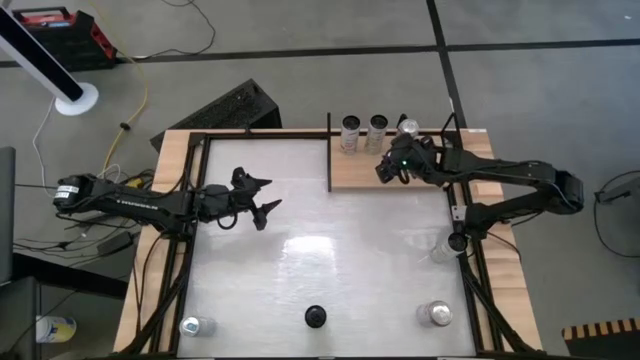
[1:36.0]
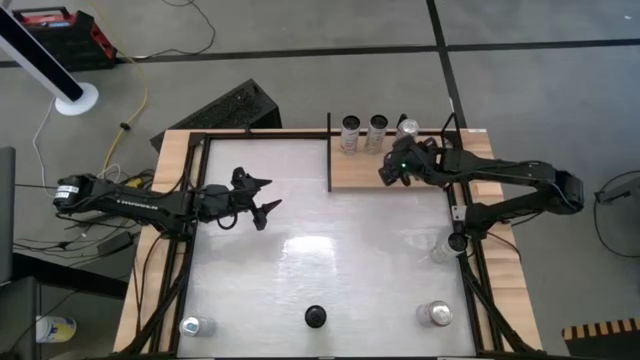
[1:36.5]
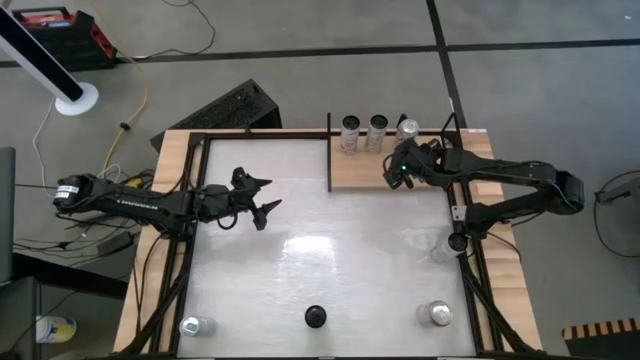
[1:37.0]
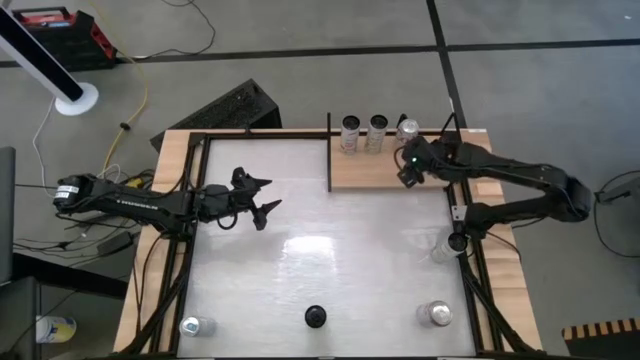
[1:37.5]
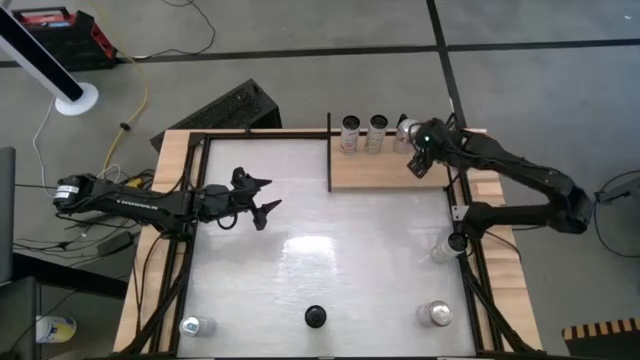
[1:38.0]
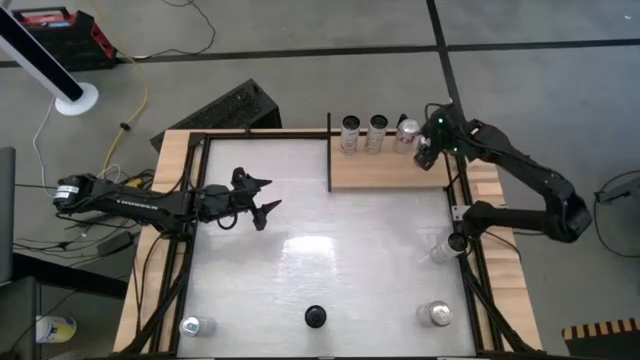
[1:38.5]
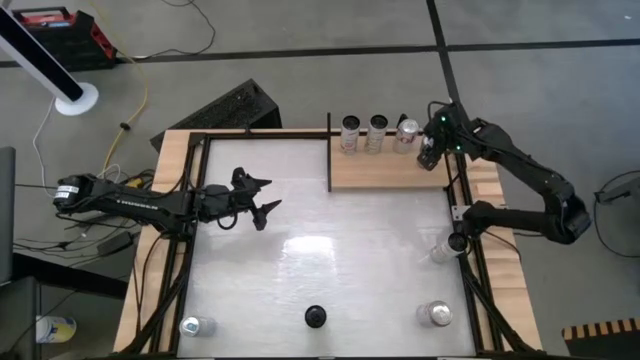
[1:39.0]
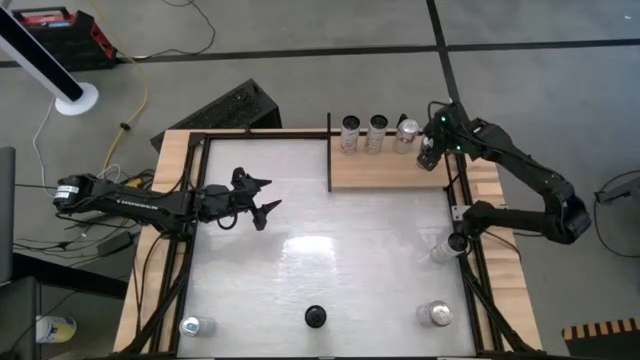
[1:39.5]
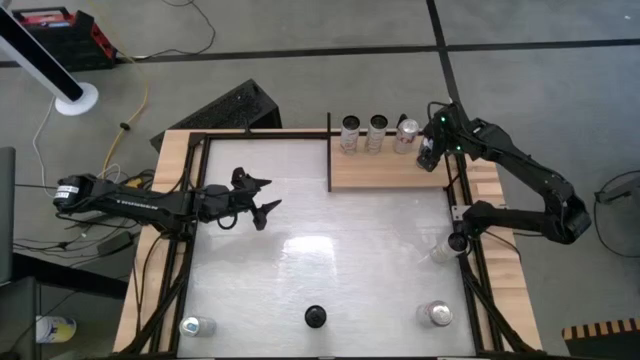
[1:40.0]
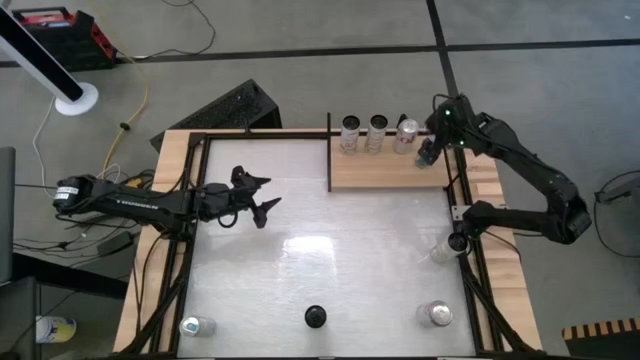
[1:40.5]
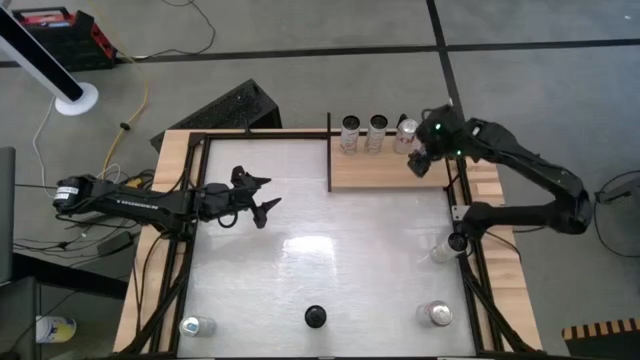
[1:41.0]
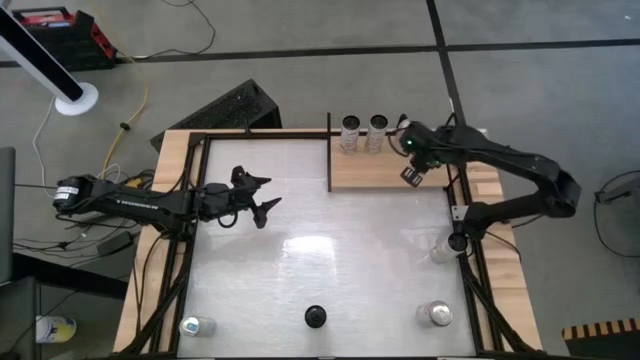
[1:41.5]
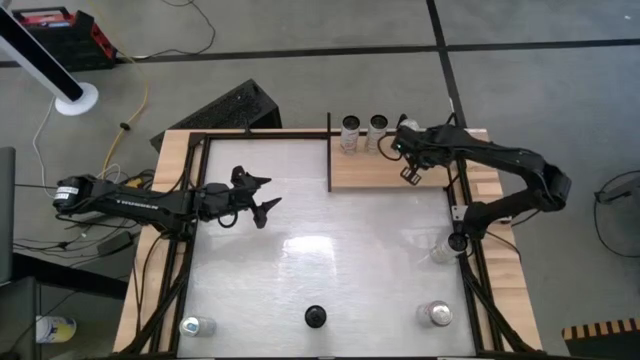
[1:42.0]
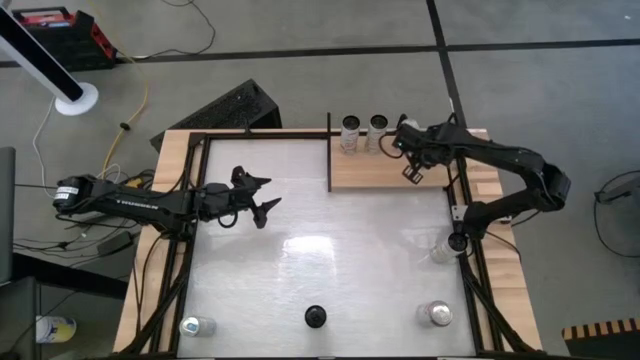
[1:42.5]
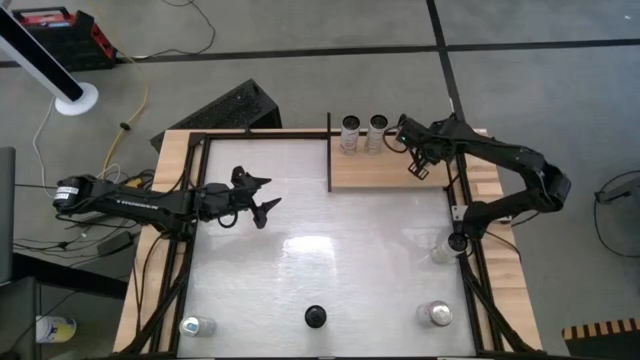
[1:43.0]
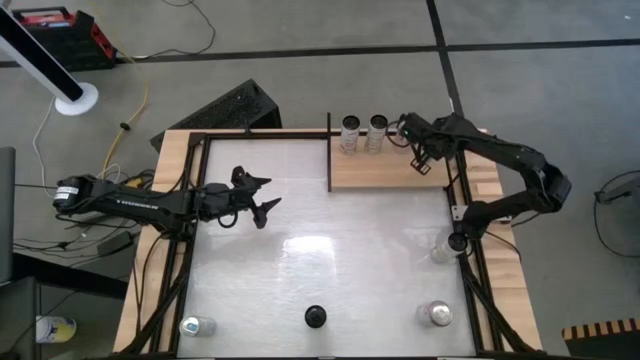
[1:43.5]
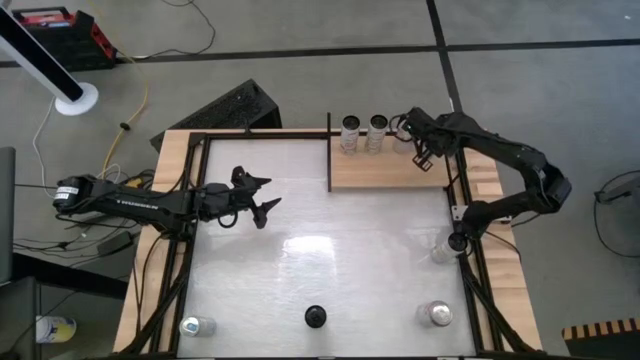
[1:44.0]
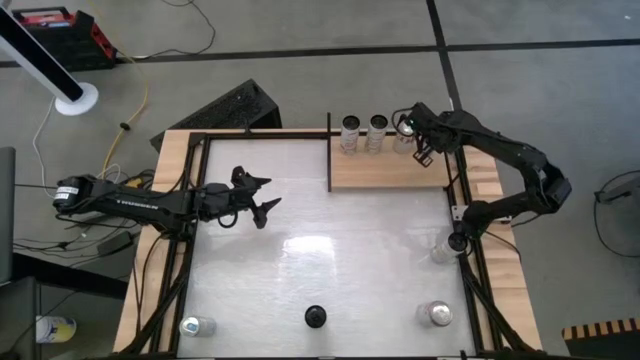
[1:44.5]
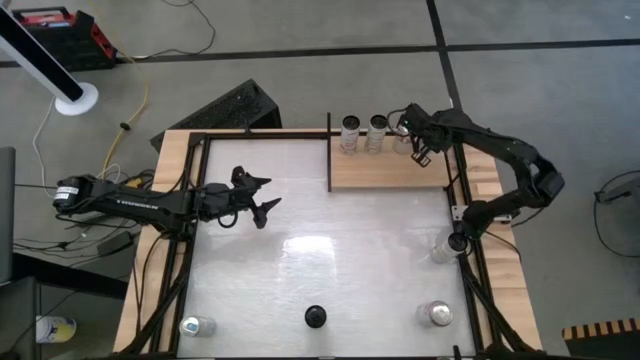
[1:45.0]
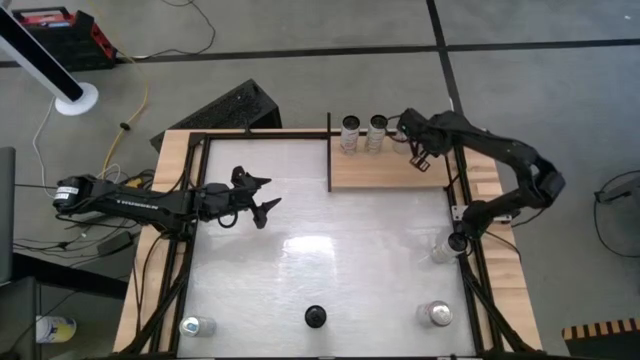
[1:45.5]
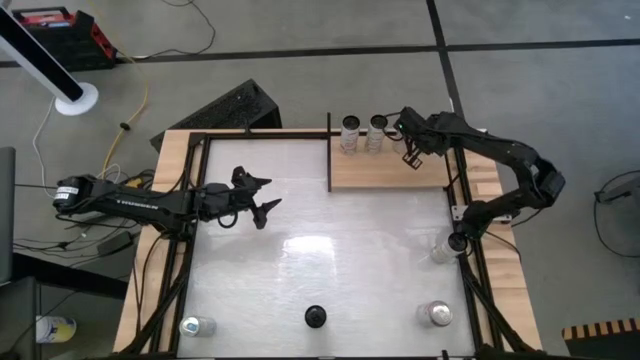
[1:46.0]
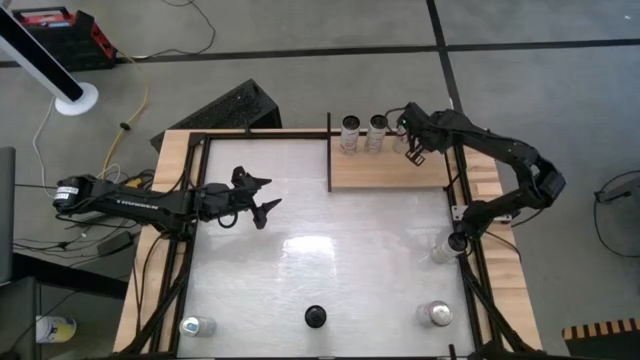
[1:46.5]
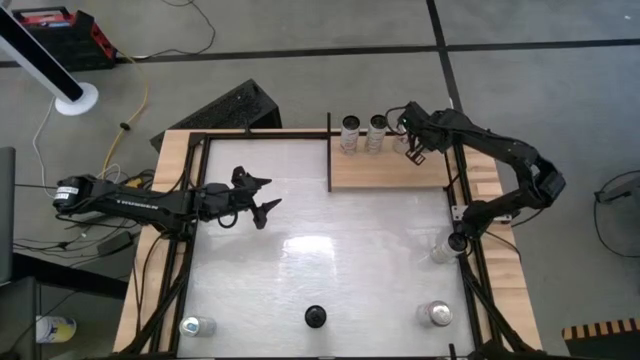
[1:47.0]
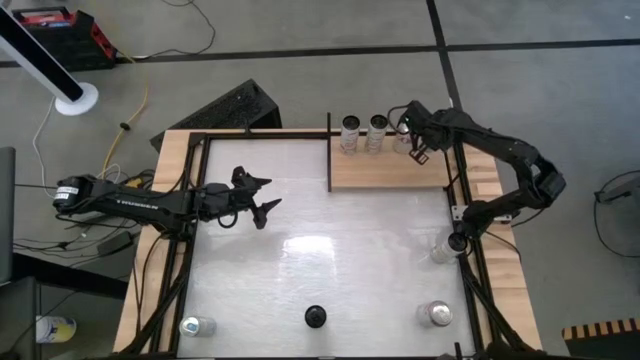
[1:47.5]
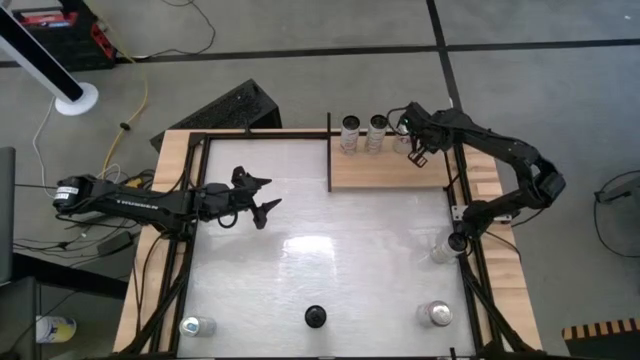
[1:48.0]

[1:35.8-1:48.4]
Task: Place canned beverage on shelf
Put the top blue soda can on the shelf

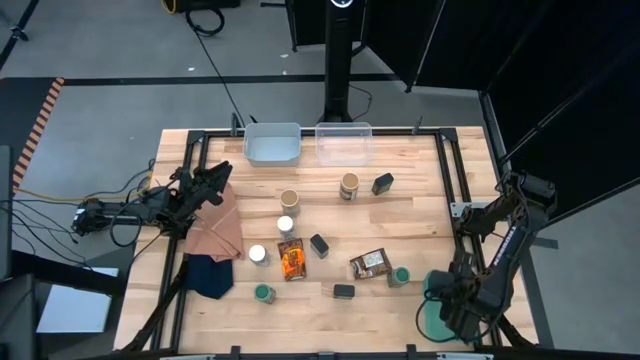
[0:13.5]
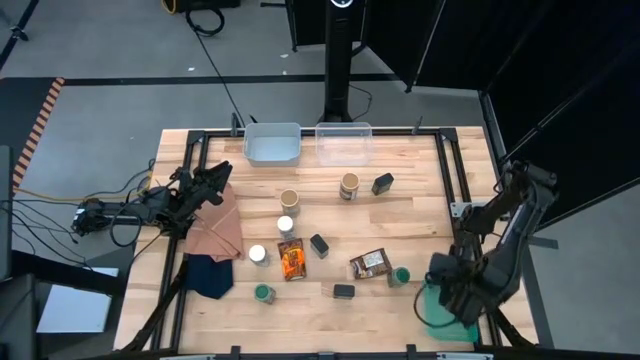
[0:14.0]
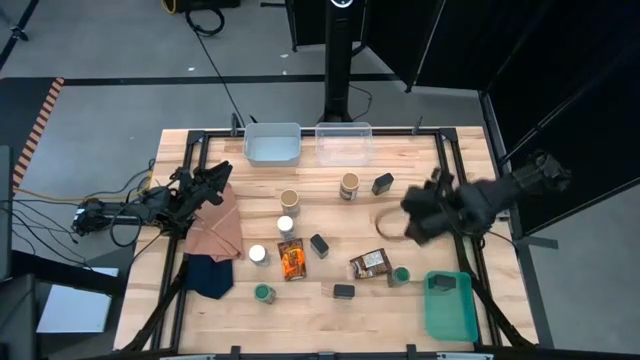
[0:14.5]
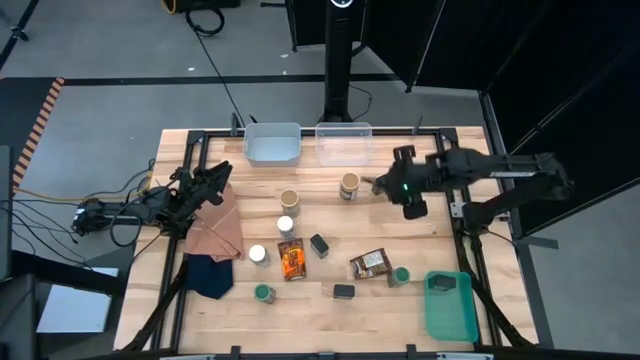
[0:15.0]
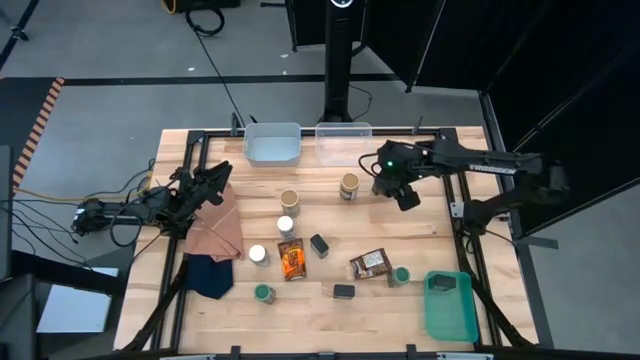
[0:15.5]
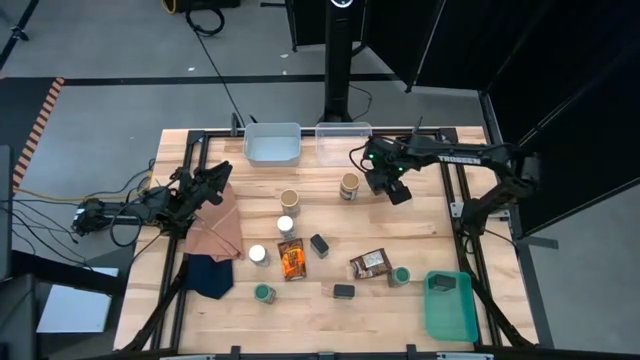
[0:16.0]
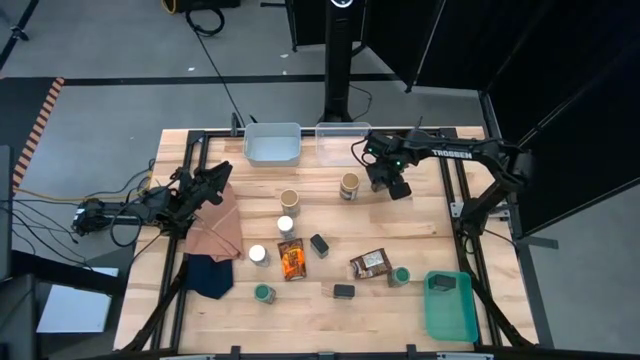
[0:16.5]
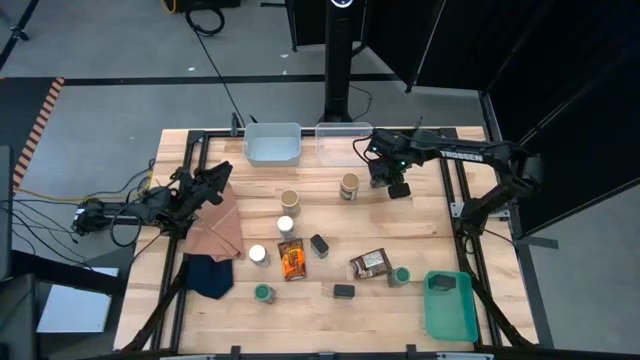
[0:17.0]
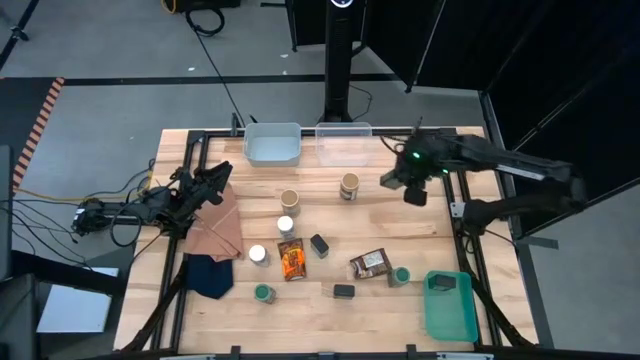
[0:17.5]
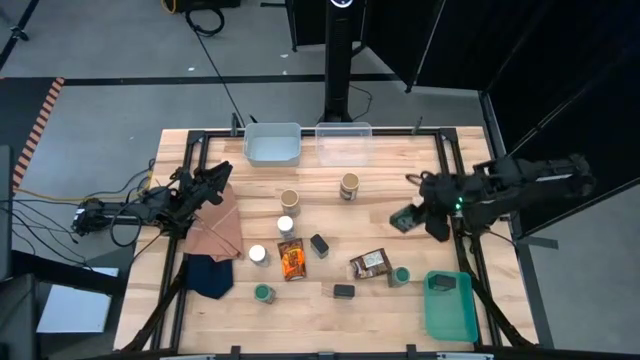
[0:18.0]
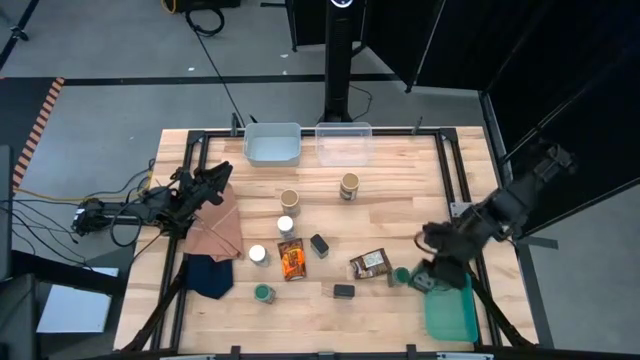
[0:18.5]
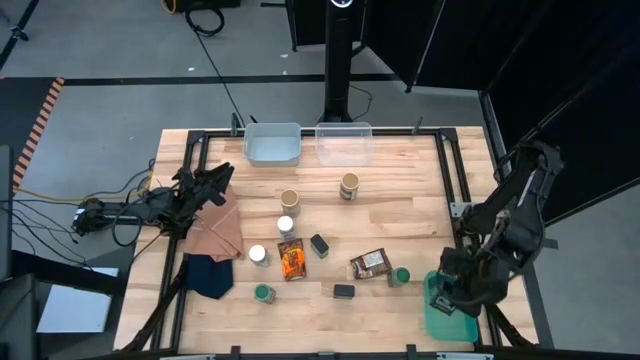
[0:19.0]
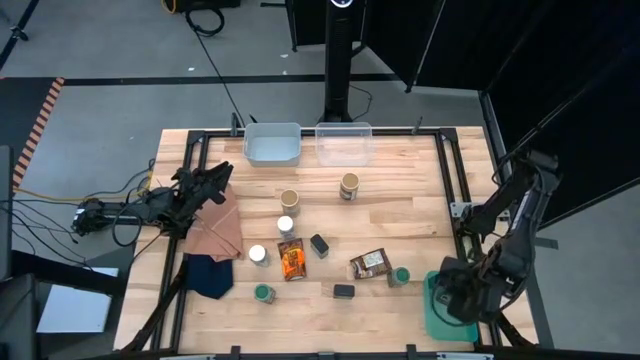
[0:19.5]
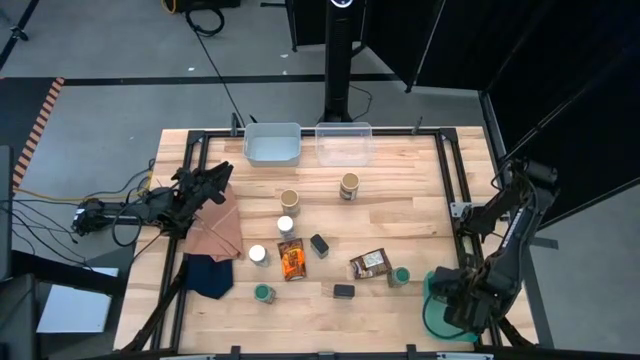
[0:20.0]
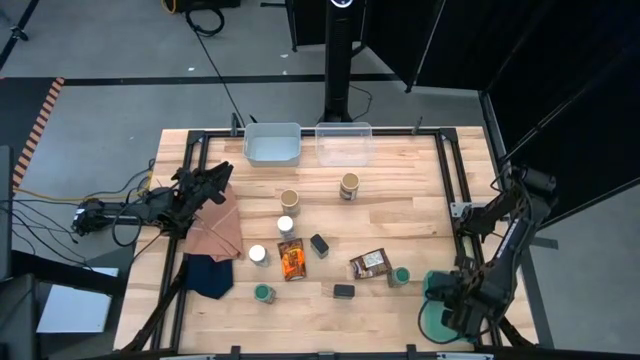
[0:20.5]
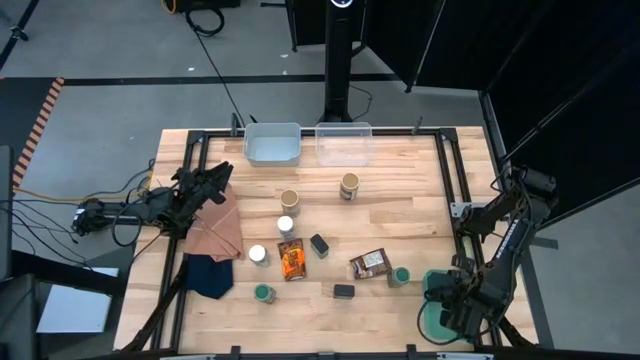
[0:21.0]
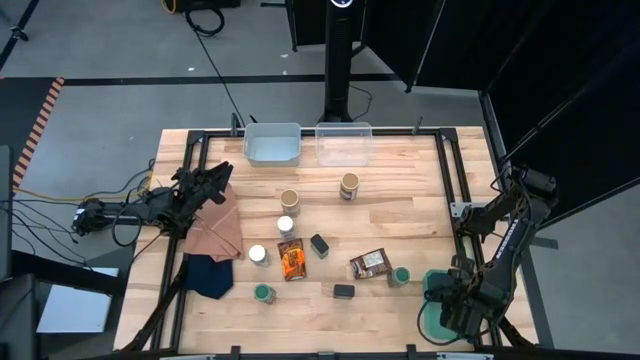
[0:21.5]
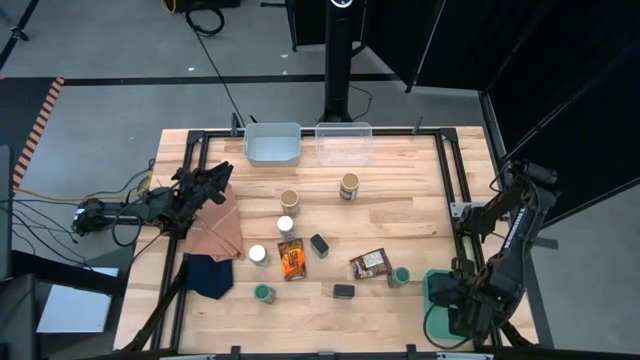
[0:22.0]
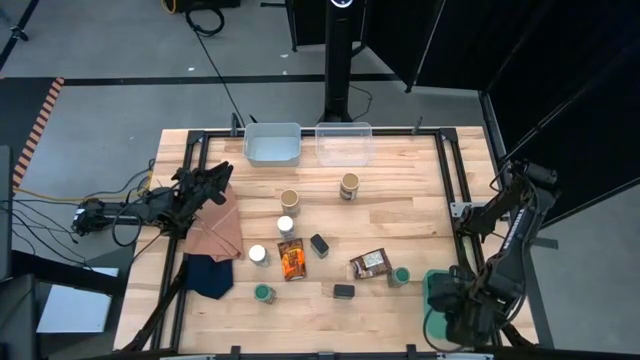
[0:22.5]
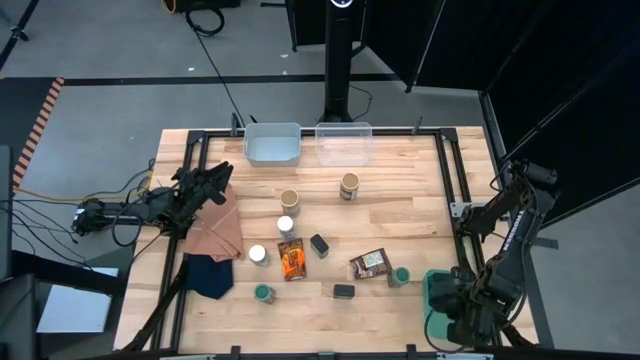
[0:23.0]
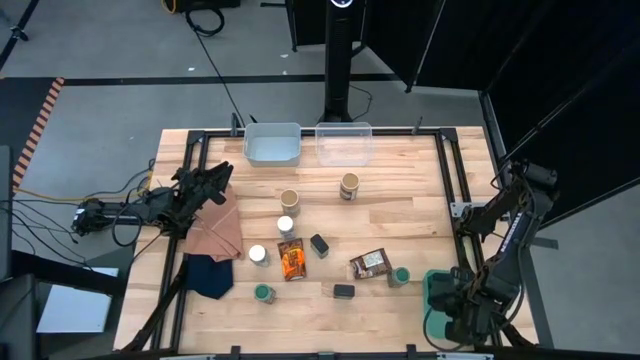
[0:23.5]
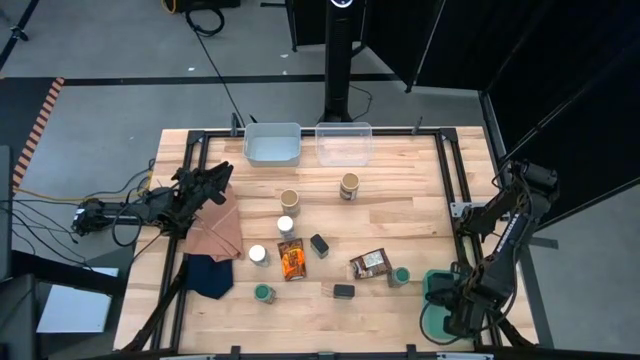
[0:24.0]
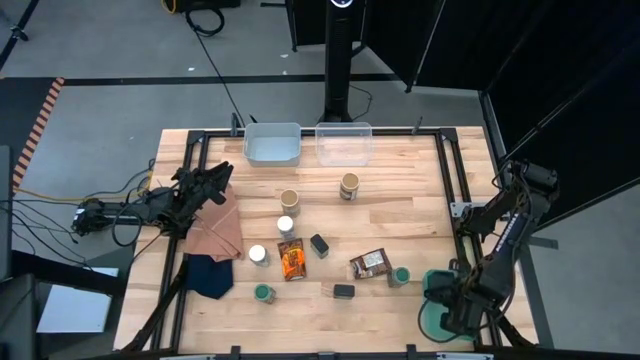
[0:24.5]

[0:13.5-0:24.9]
Task: Sort spices by type
Put the top right black seasoning can into the green bin
